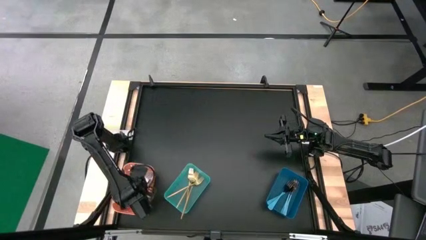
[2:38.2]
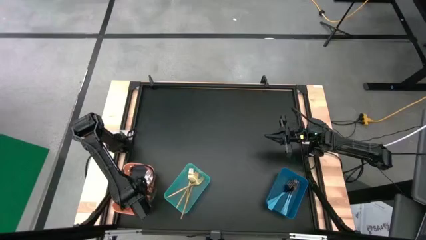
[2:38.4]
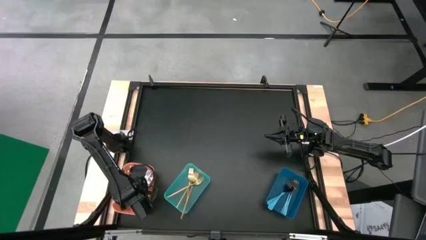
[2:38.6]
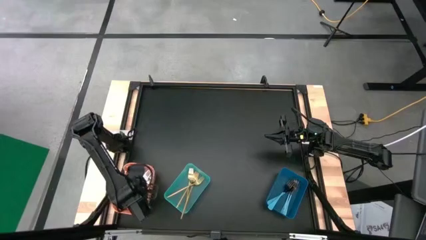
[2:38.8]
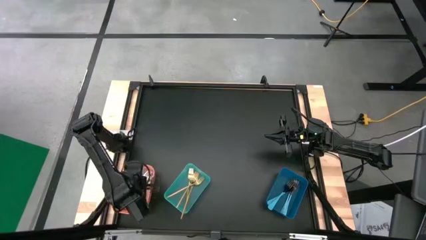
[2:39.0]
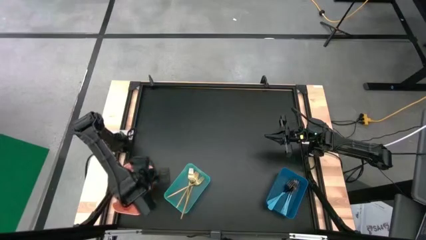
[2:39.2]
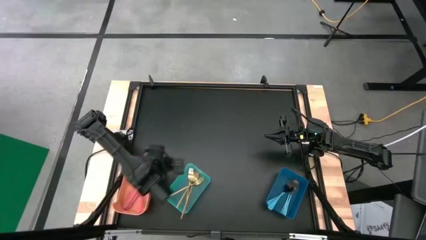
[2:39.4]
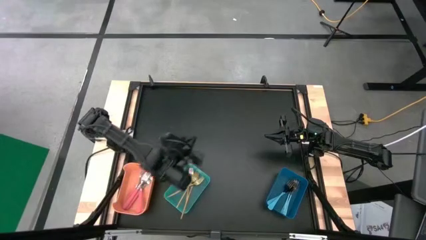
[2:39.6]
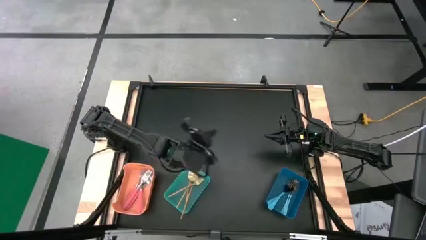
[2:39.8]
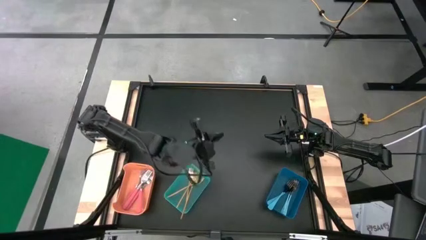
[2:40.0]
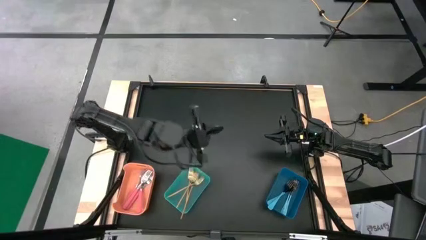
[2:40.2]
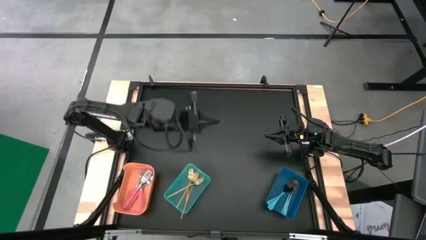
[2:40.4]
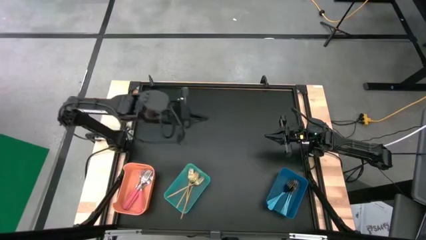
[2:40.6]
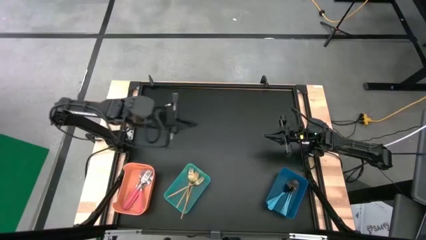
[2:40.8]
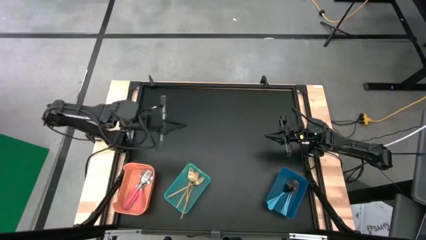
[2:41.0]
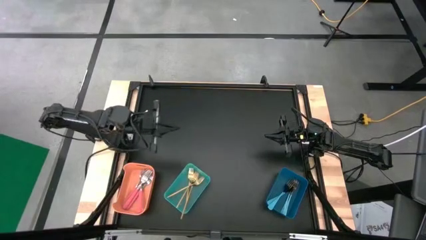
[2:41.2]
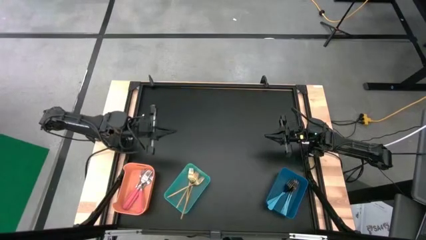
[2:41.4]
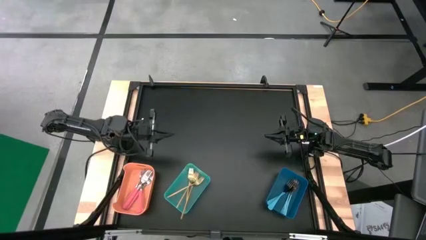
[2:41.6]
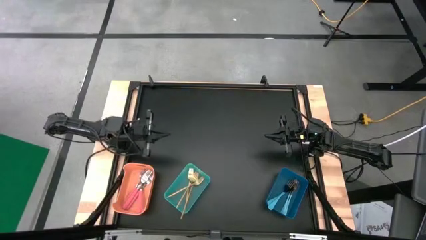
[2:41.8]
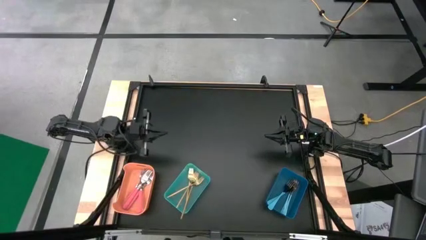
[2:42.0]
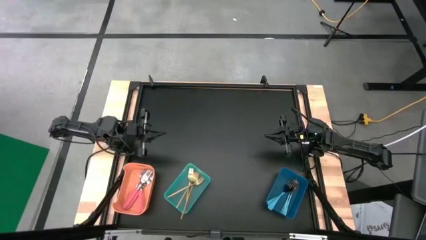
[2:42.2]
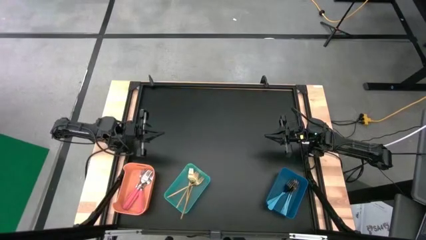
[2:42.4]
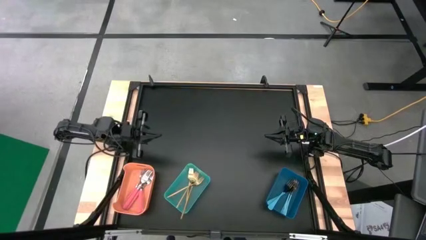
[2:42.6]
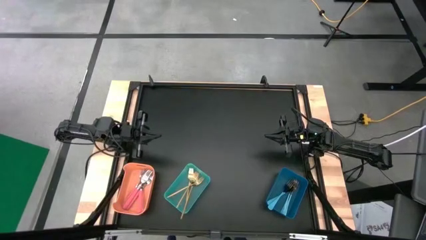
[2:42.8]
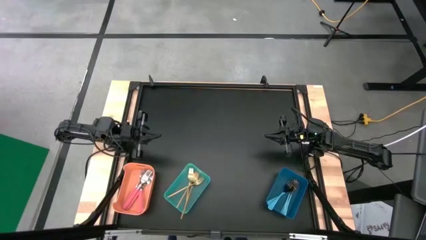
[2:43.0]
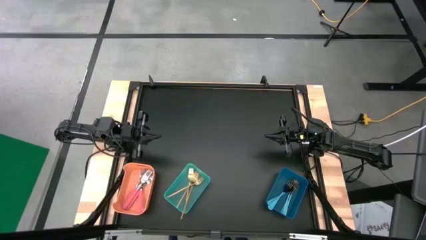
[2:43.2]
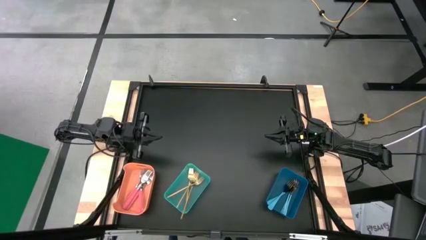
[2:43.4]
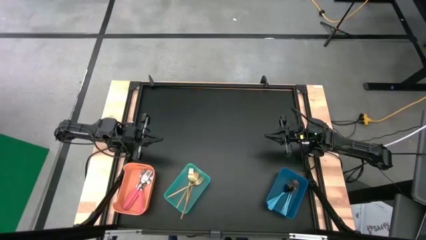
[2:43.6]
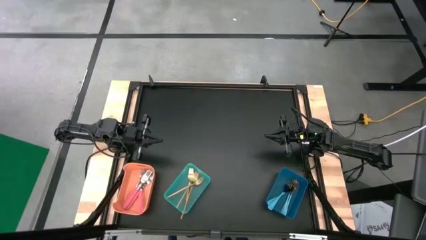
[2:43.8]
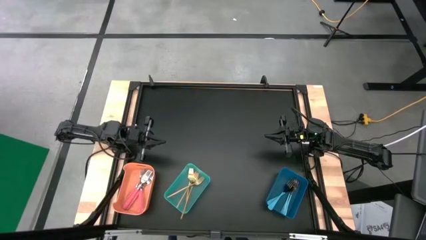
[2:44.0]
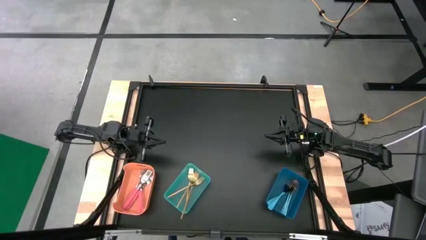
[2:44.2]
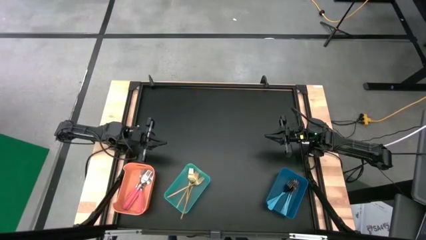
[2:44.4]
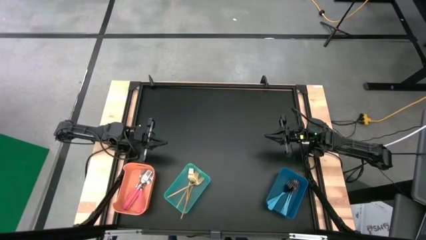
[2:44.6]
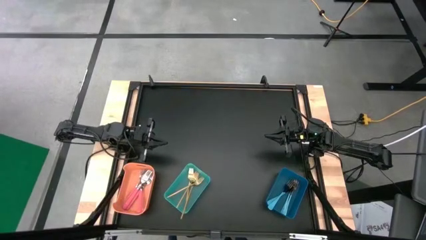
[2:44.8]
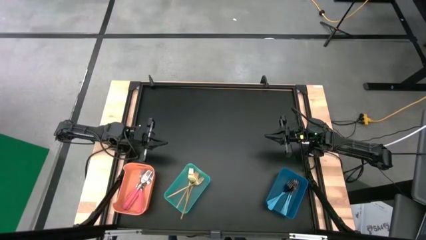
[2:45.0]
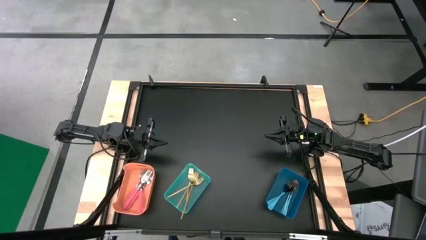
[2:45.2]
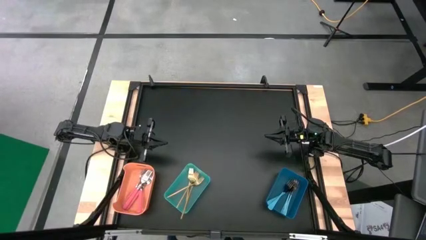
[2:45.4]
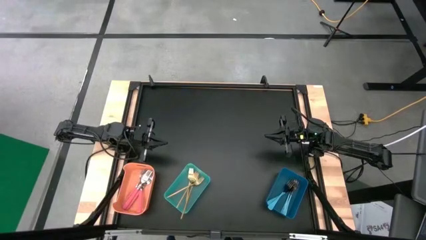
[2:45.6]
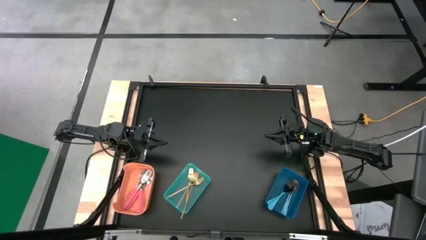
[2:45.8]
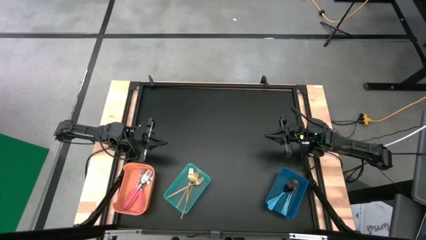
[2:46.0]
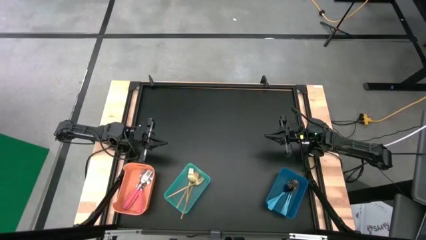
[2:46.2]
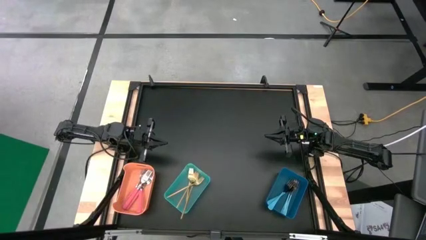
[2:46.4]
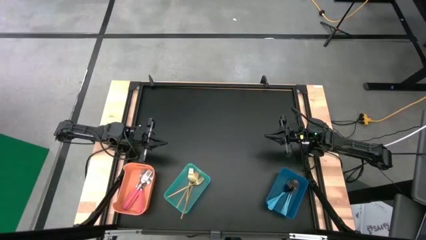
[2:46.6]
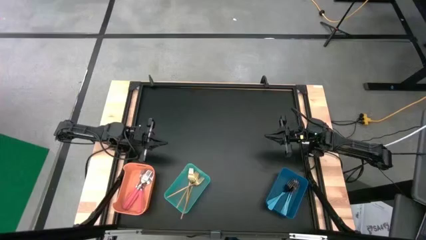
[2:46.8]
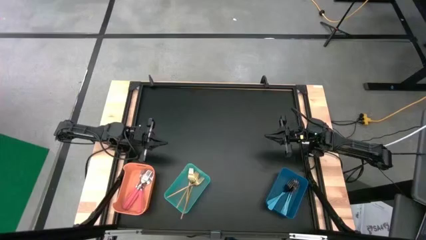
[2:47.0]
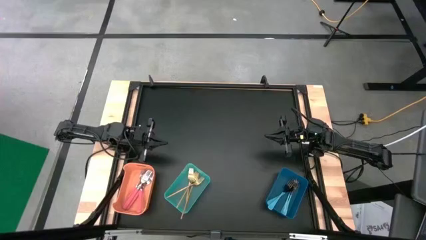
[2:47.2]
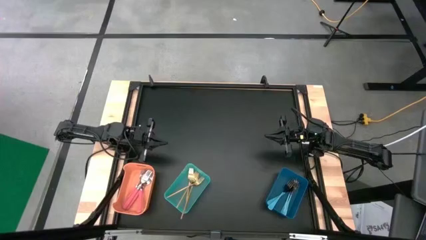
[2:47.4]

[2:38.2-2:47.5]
Task: Sort silverware by color (type)
Return to Home Position

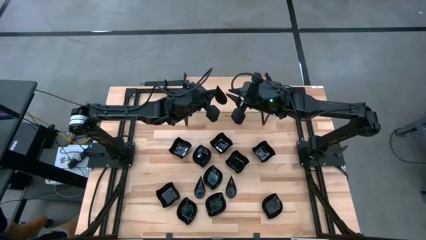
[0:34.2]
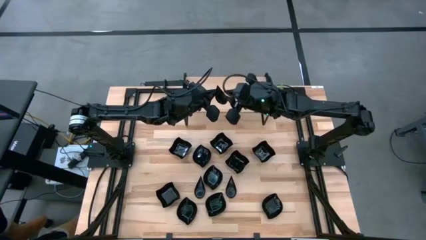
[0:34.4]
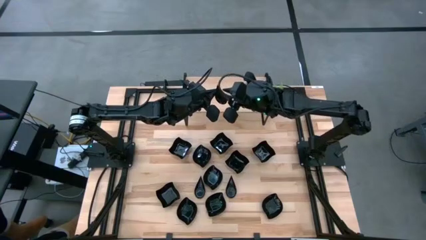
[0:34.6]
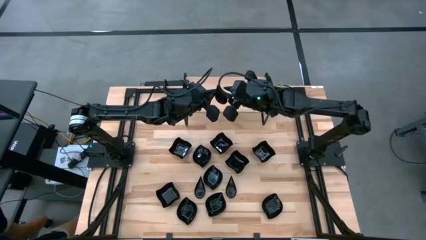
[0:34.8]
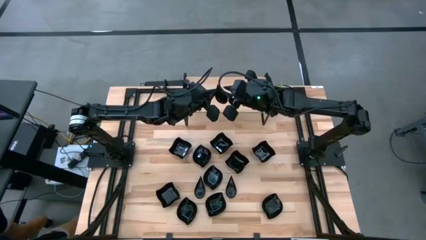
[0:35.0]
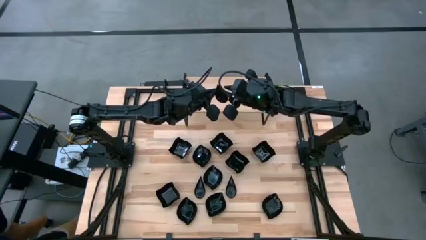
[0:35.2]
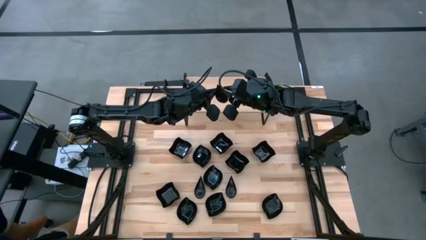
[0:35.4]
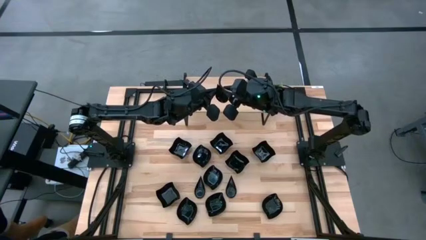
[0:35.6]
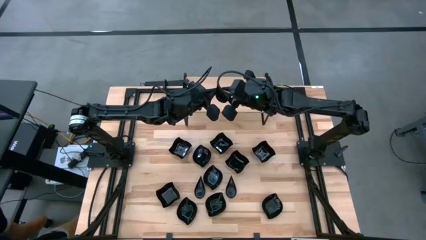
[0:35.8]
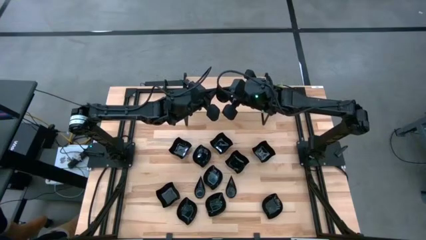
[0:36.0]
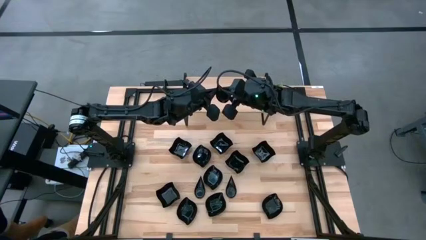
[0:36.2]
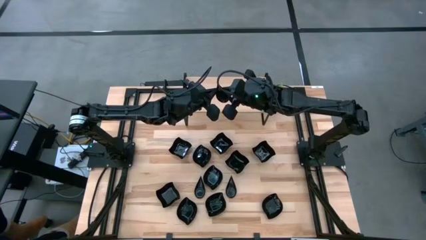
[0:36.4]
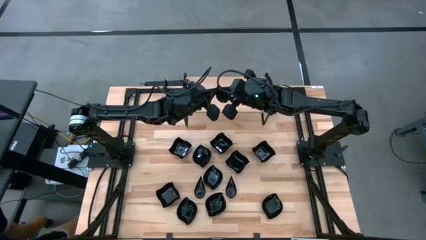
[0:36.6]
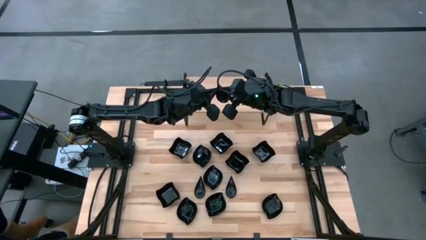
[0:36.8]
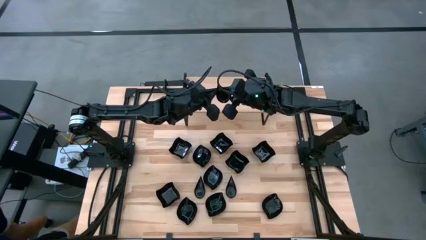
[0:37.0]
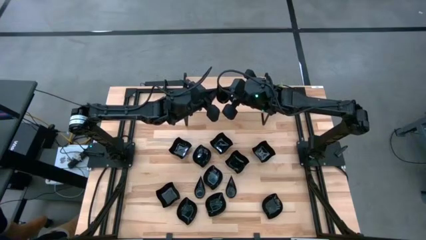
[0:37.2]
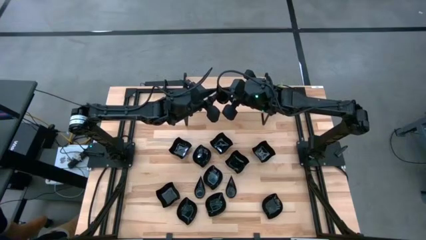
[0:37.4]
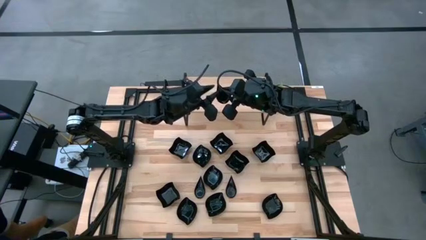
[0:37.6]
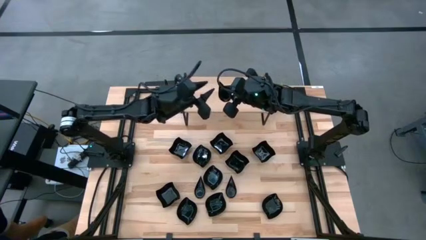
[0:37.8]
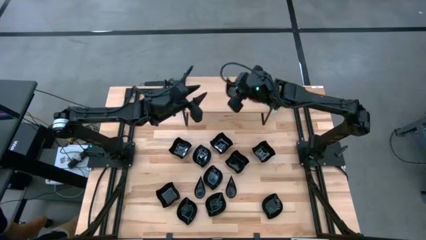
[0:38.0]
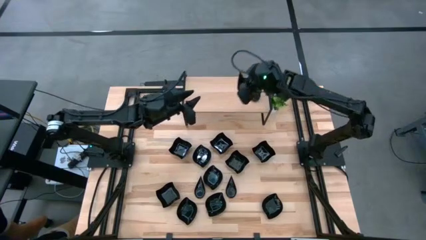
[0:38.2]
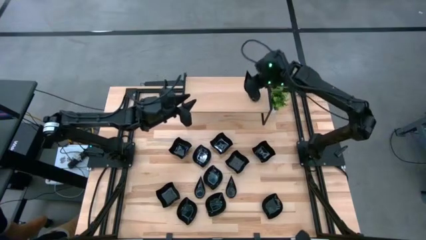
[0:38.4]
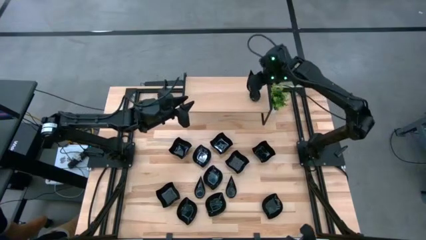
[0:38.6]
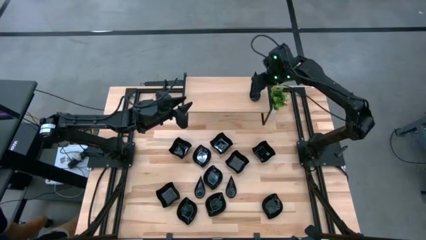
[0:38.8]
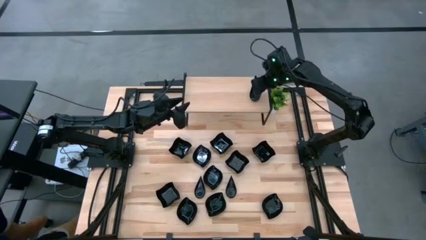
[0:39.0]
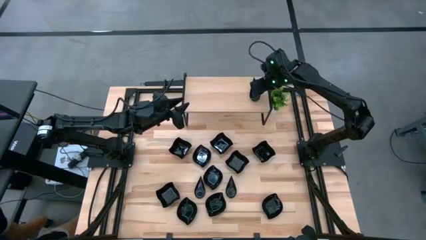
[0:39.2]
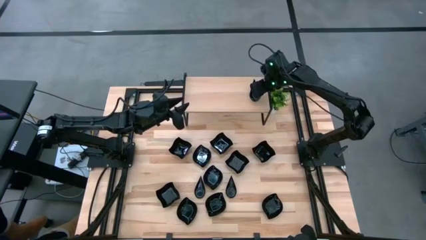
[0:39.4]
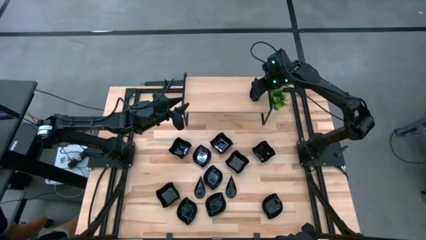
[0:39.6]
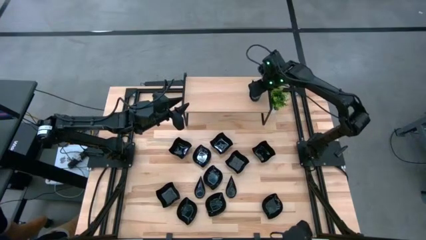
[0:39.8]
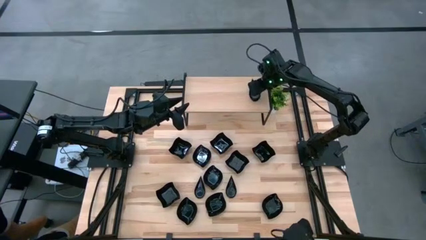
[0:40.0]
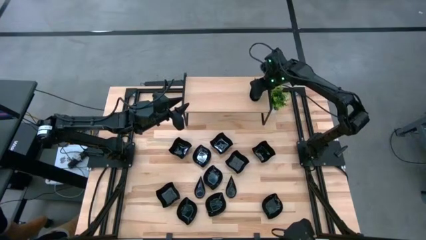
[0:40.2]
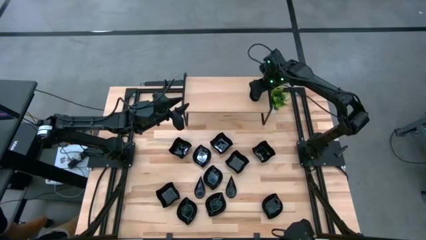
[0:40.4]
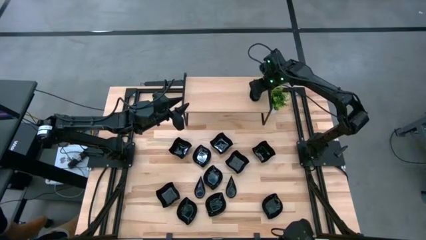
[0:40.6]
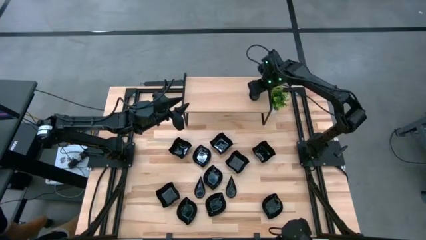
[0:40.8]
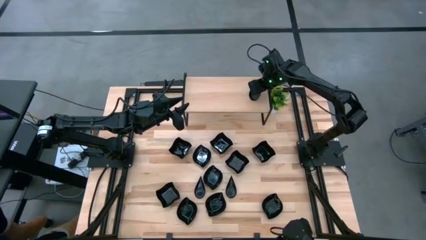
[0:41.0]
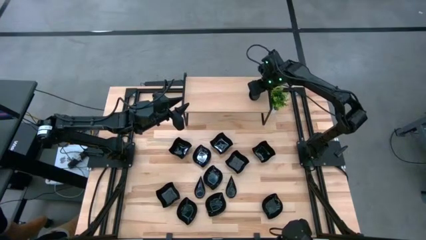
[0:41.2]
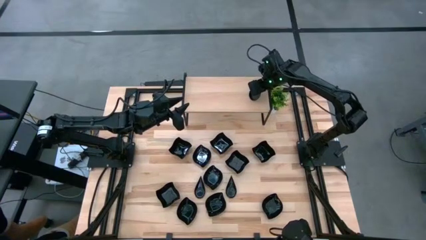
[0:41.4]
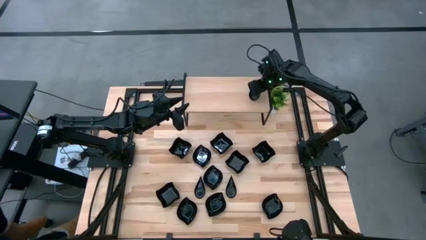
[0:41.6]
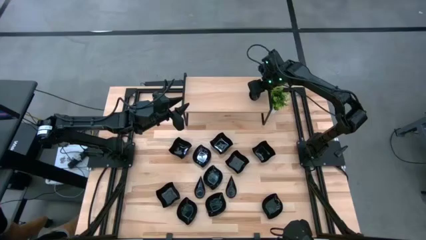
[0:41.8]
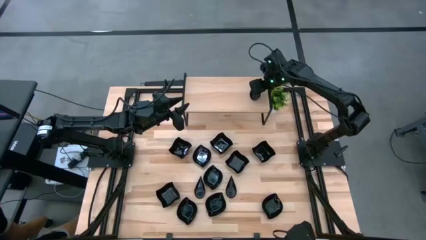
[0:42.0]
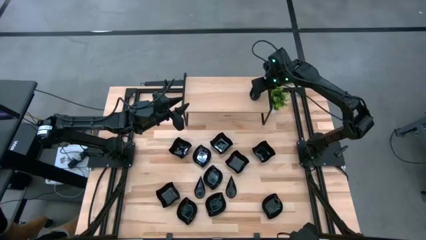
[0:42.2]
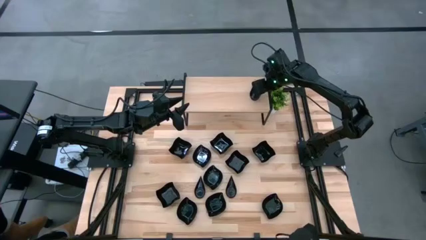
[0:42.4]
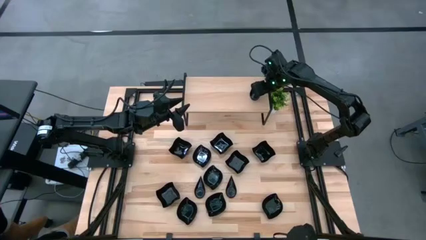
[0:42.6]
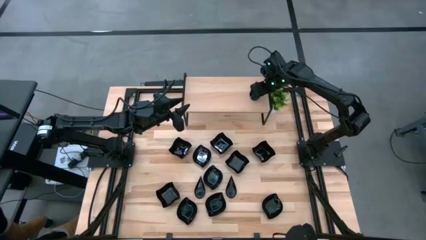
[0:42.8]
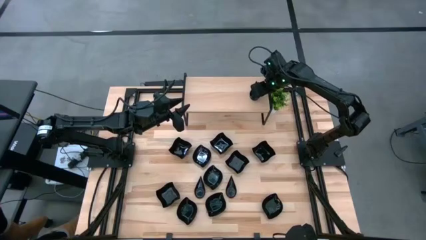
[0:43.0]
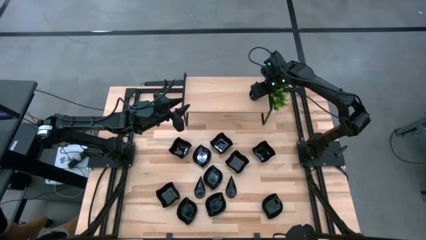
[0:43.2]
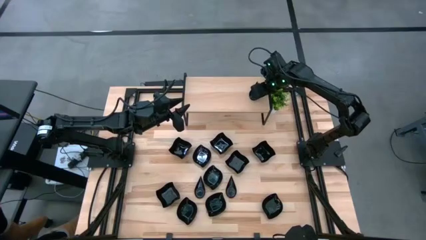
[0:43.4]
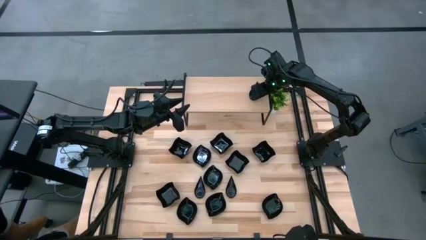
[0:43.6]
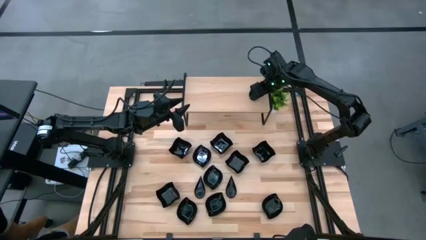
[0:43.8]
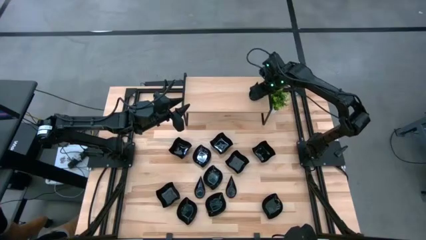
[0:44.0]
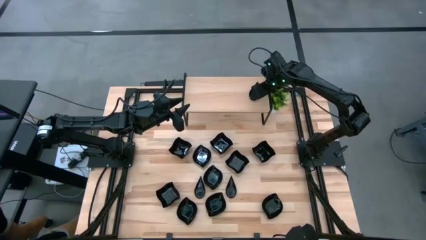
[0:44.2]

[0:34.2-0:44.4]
Task: Pick & Place Mini shaped plates
Stack the left black drop shaped plate on top of the other black drop shaped plates on the shelf
